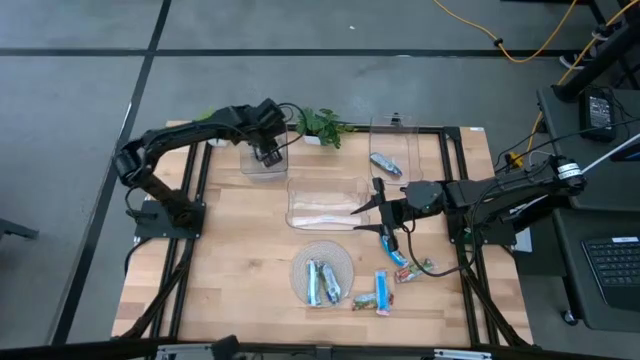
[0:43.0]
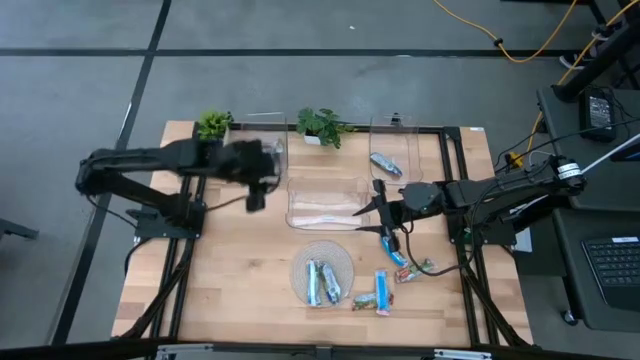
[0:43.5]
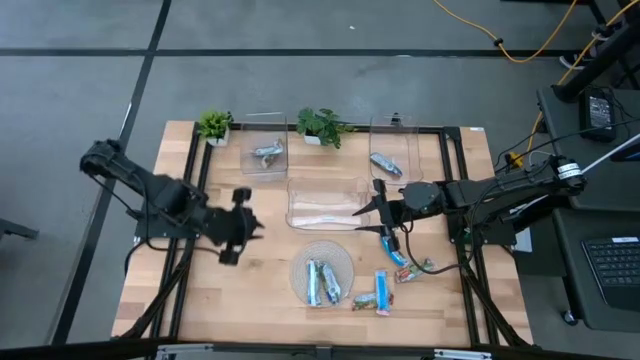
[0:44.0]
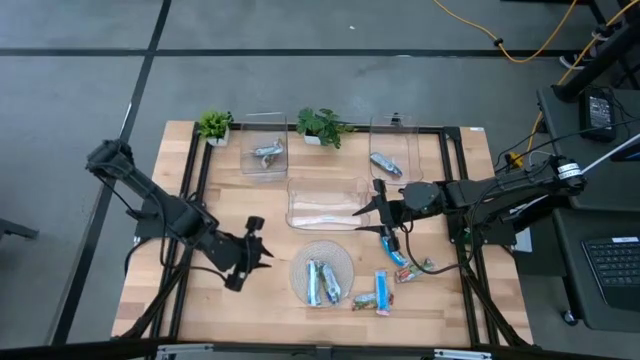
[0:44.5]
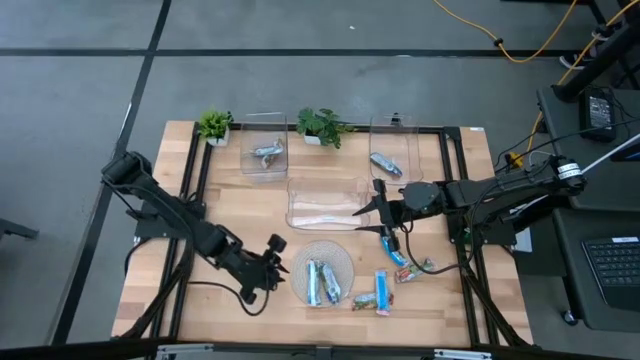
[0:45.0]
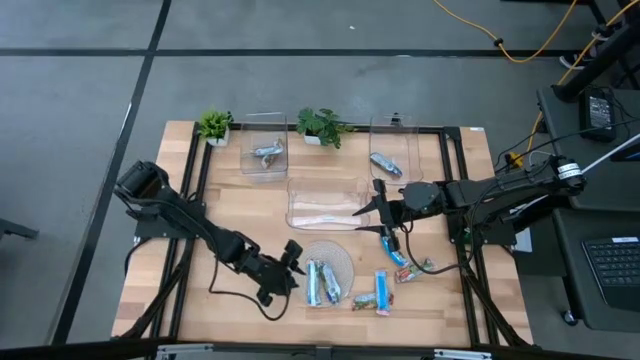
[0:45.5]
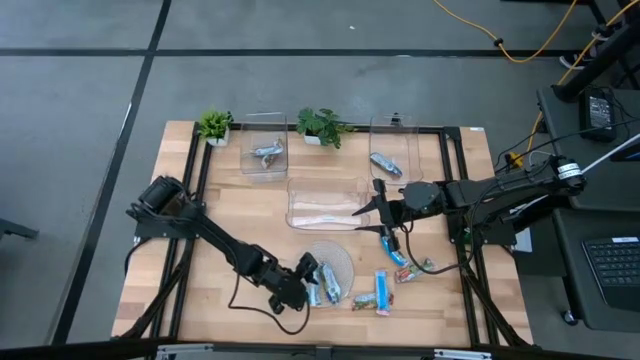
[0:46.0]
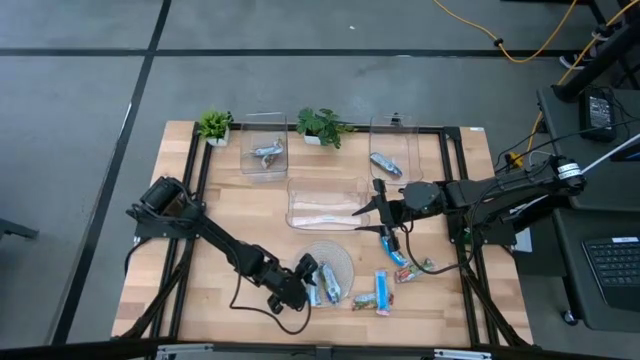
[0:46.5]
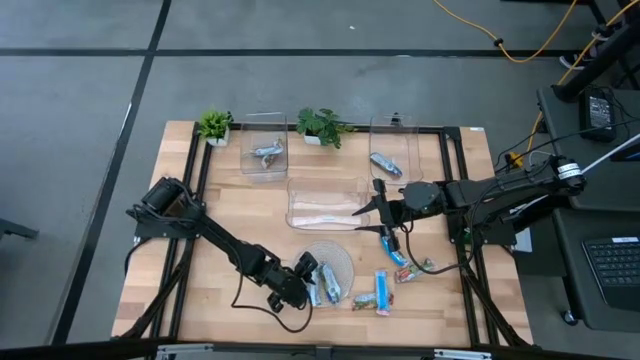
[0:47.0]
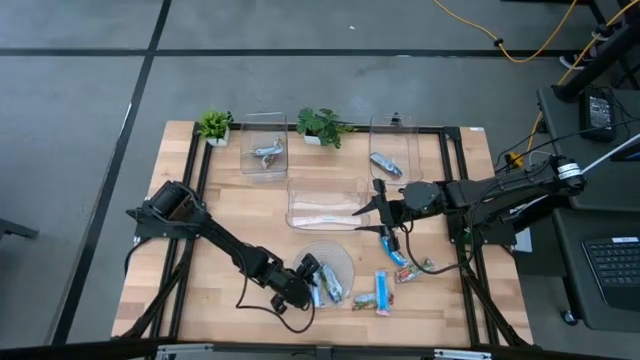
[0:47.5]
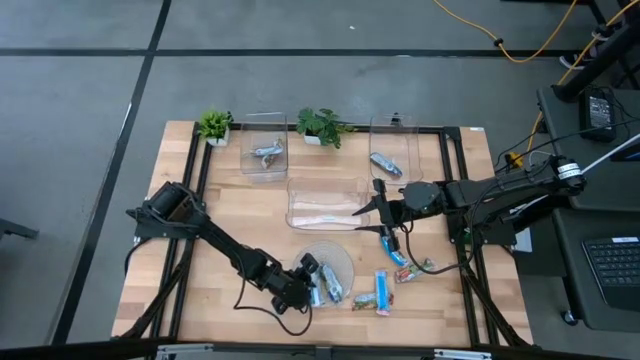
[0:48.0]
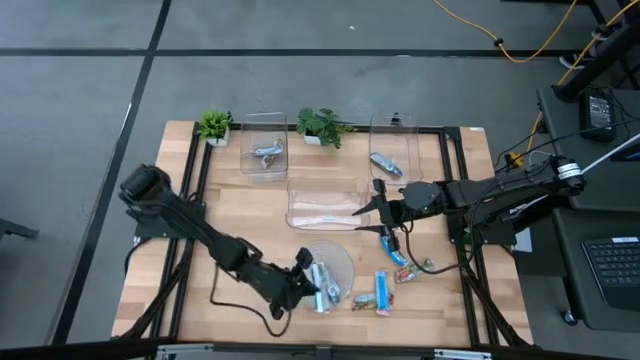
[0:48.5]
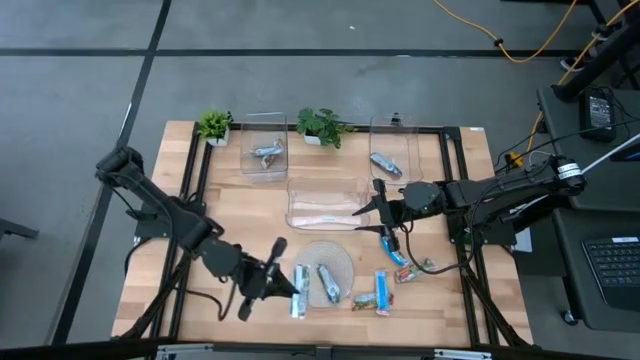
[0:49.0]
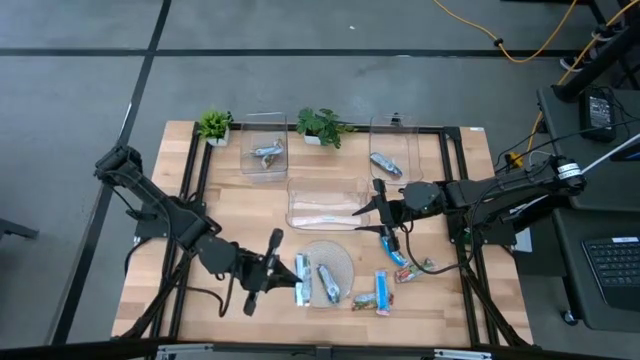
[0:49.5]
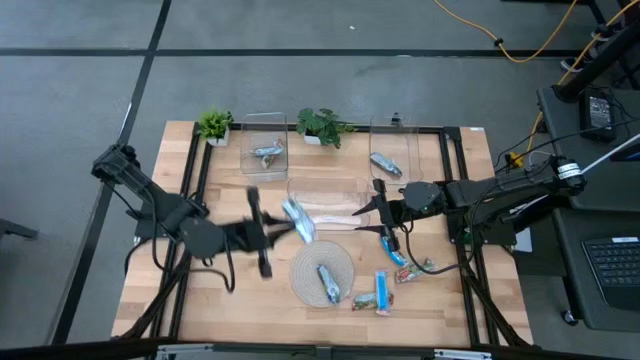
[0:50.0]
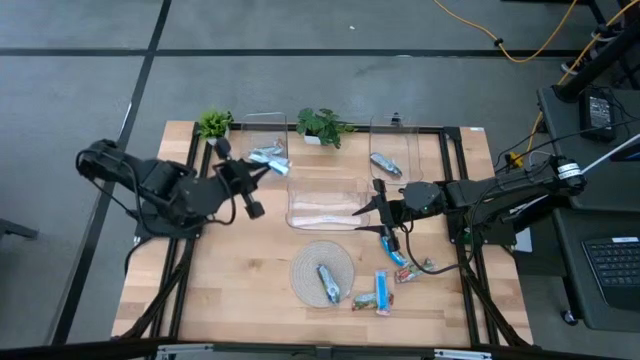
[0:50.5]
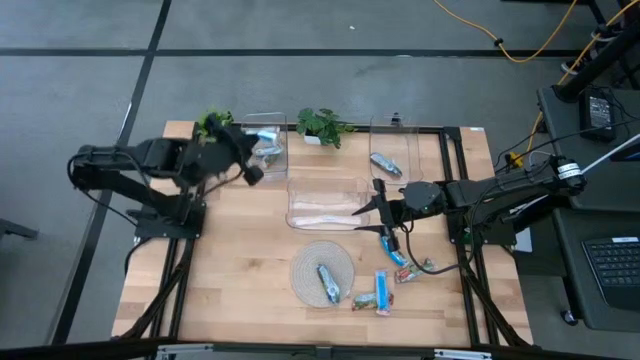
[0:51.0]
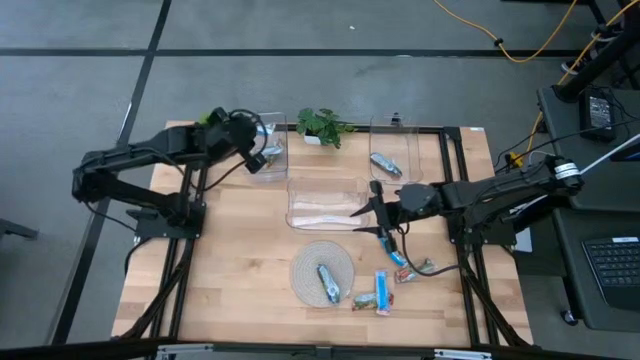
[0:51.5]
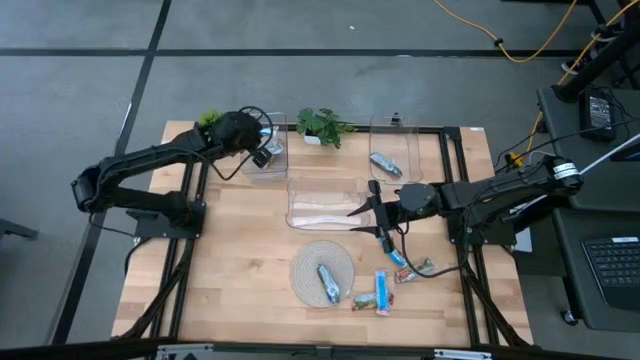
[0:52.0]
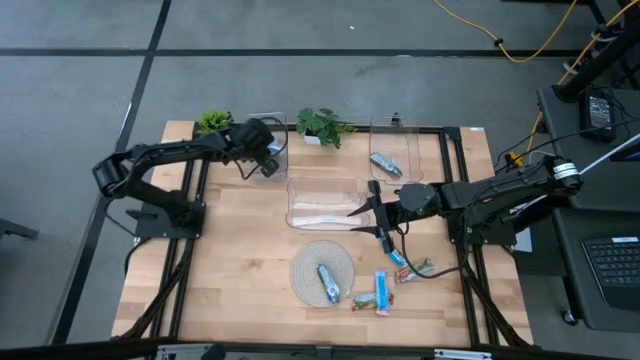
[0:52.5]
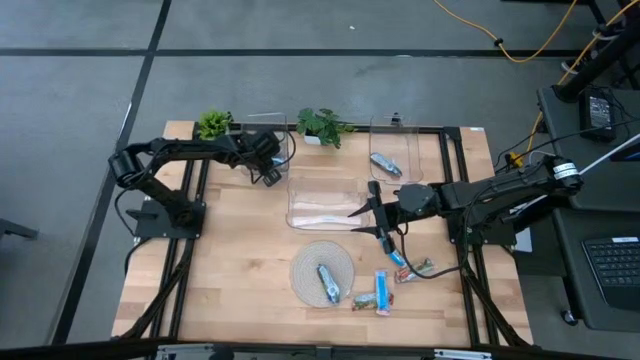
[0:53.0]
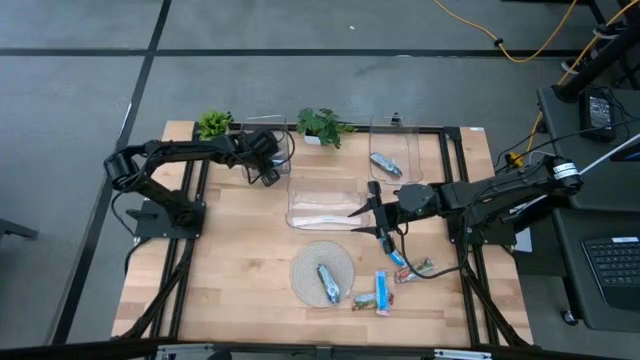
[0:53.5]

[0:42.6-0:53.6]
Task: Pick and place Granola Bars by type
Put the orange granola bar into the top left transparent bin

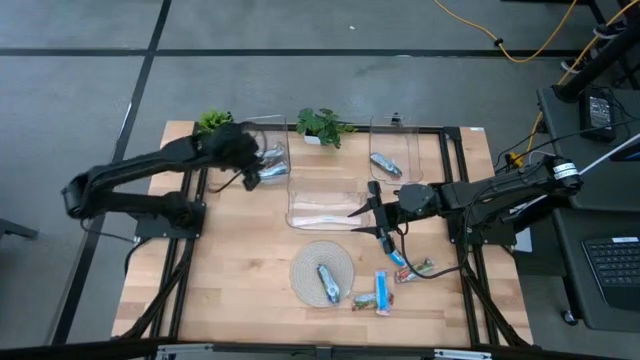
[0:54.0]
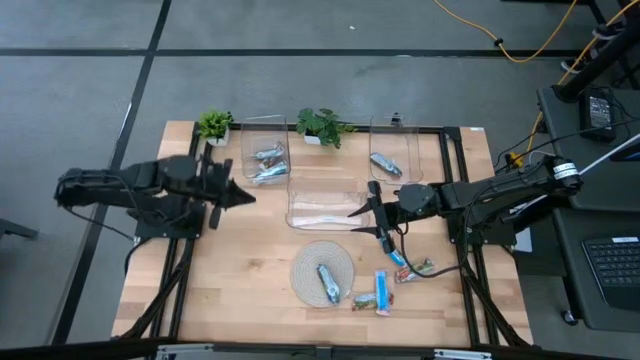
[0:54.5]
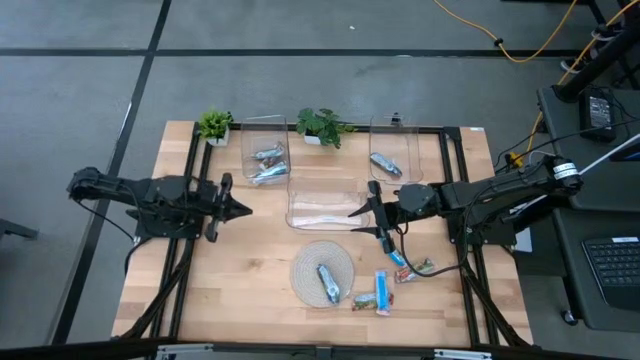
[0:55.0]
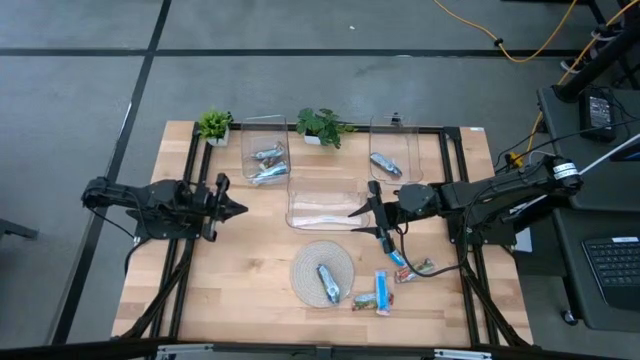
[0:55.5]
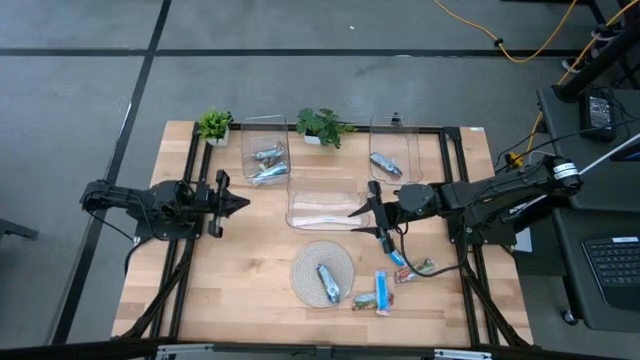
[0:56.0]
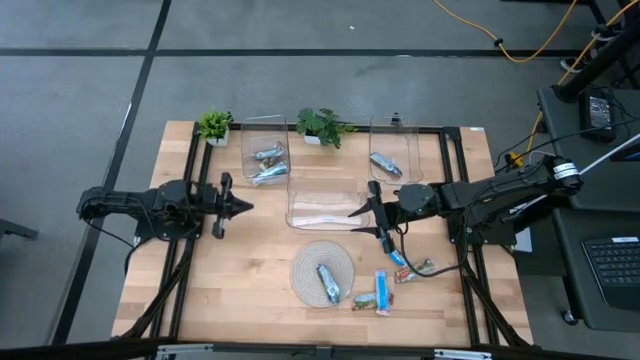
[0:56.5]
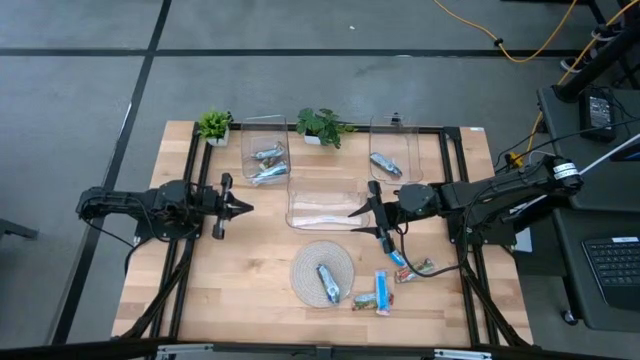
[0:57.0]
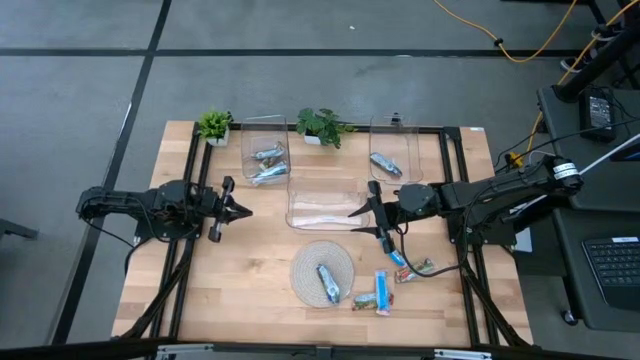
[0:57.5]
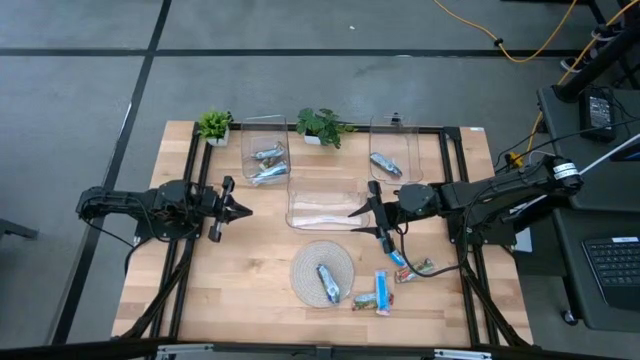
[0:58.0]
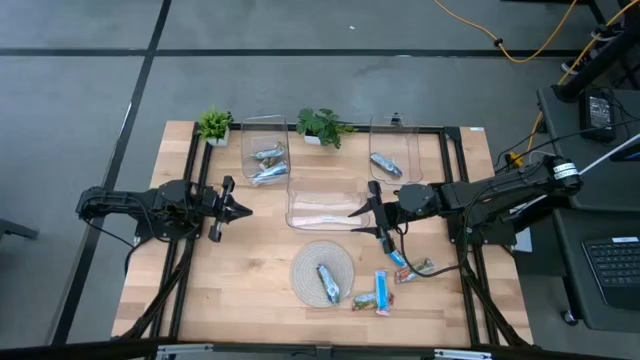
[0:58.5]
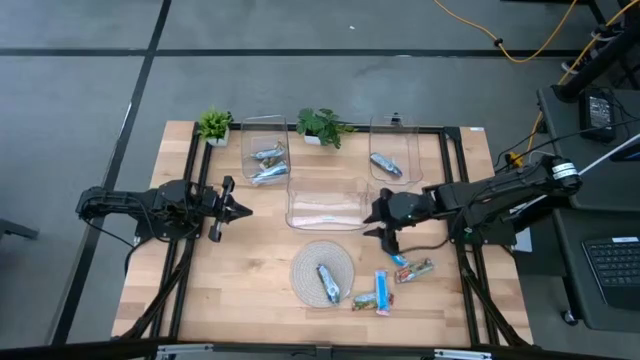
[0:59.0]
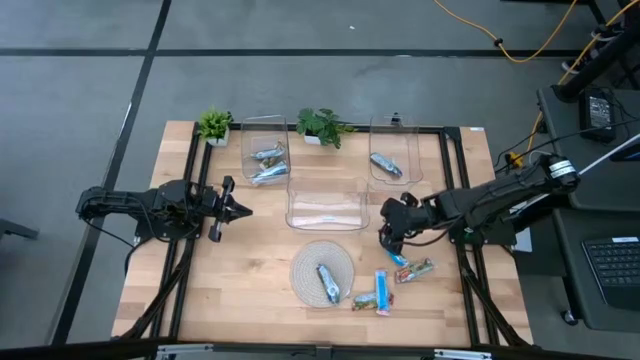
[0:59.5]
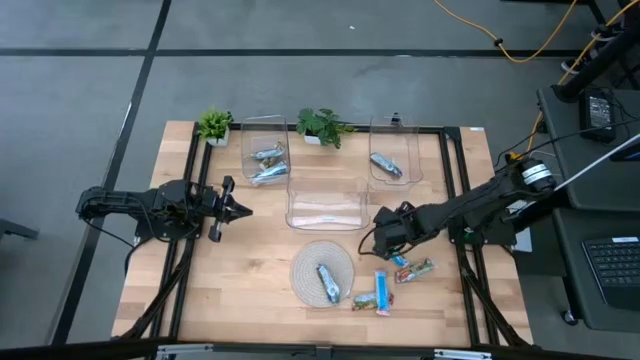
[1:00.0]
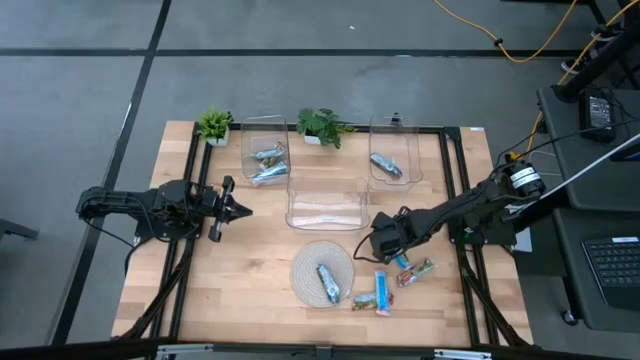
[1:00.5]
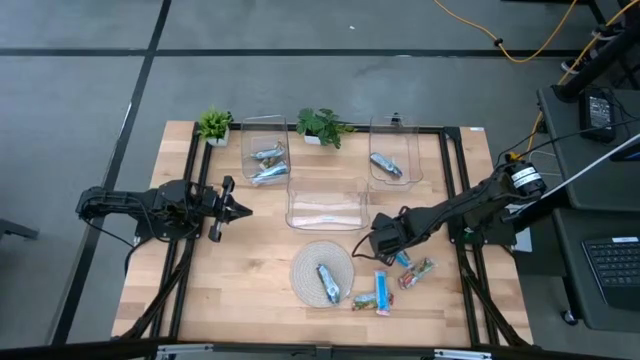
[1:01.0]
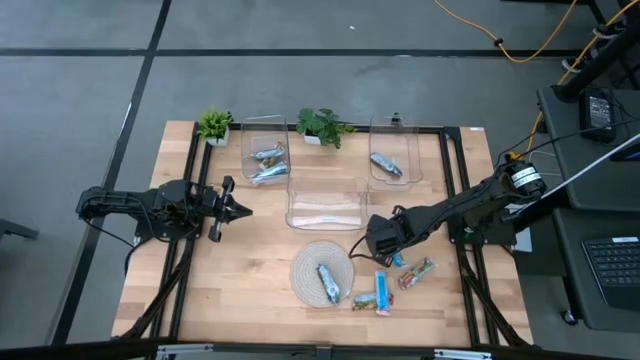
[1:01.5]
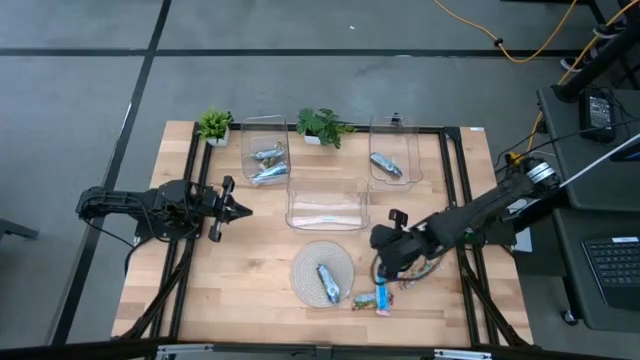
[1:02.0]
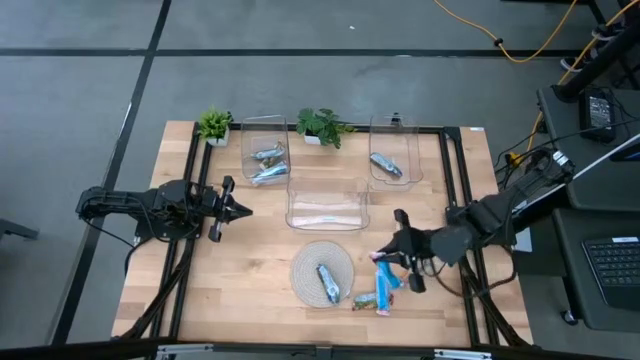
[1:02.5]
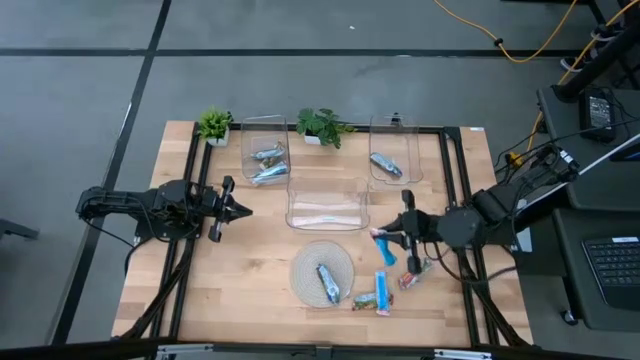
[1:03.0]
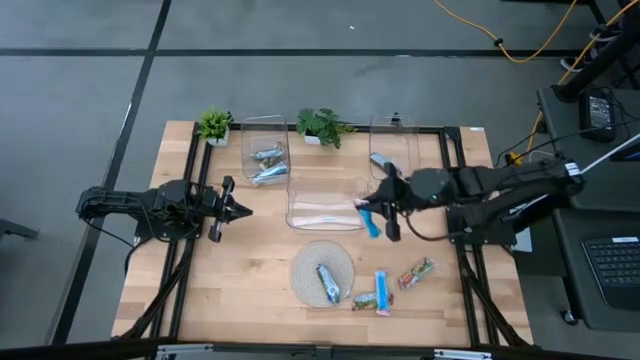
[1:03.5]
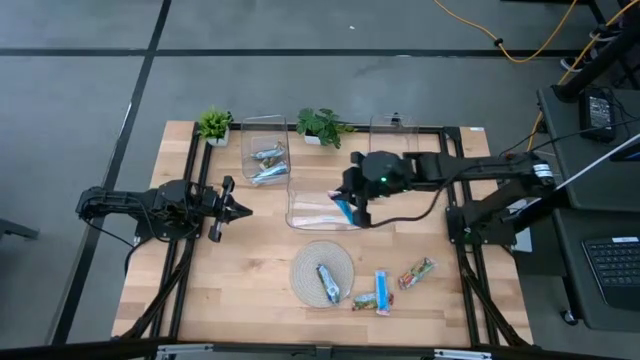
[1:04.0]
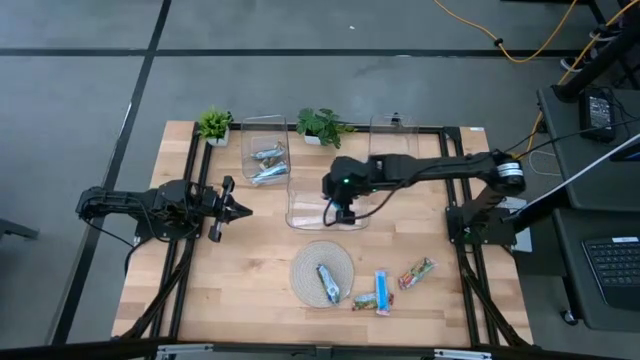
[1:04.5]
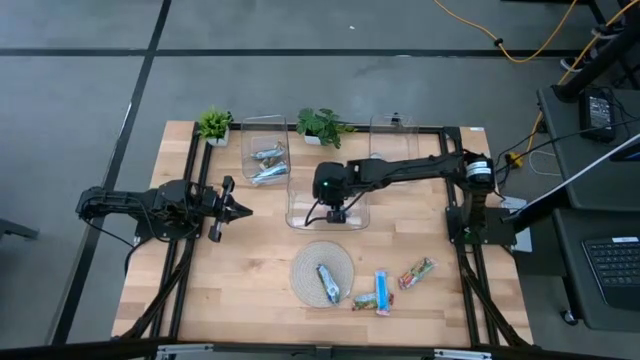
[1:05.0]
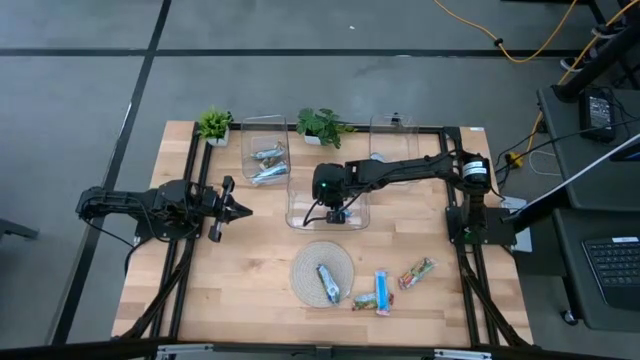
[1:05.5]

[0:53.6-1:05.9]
Put the red granola bar into the bottom transparent bin
